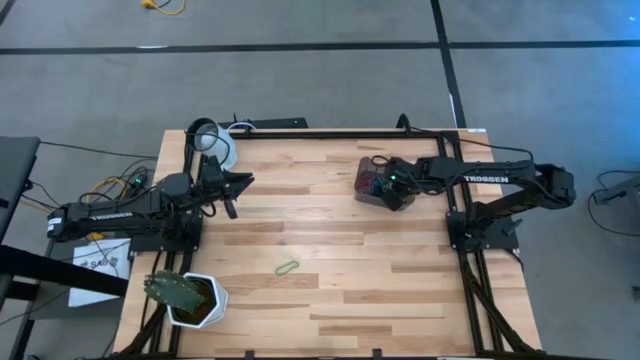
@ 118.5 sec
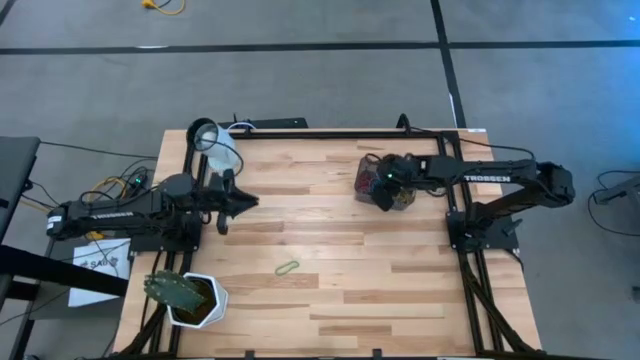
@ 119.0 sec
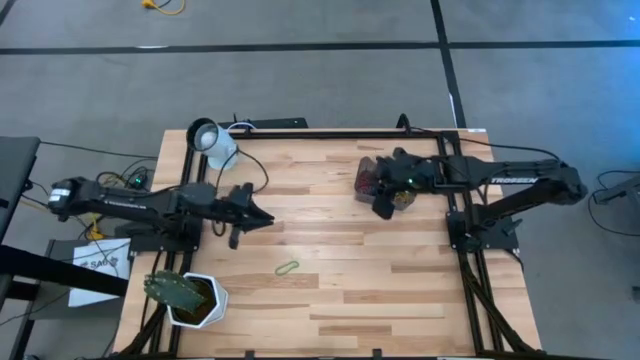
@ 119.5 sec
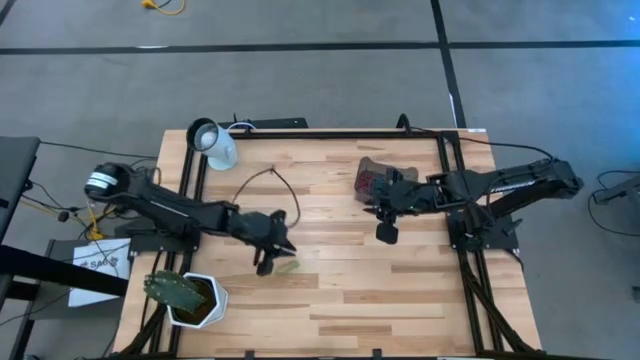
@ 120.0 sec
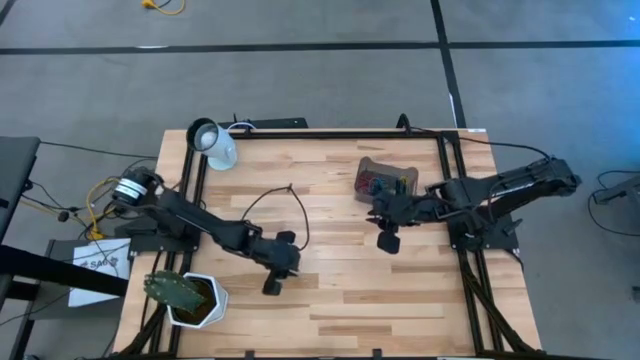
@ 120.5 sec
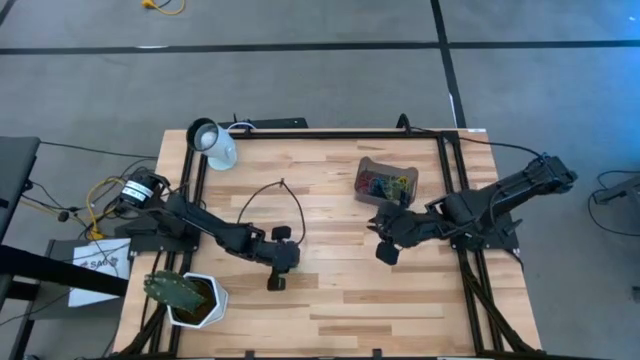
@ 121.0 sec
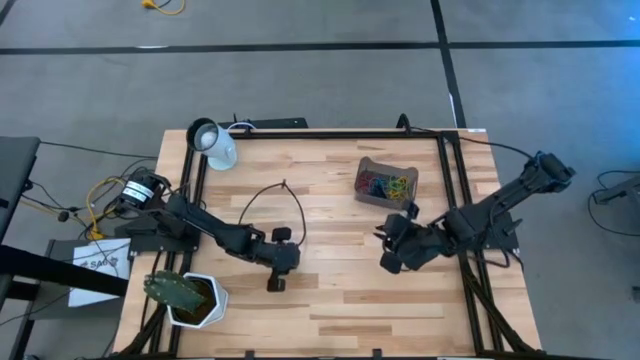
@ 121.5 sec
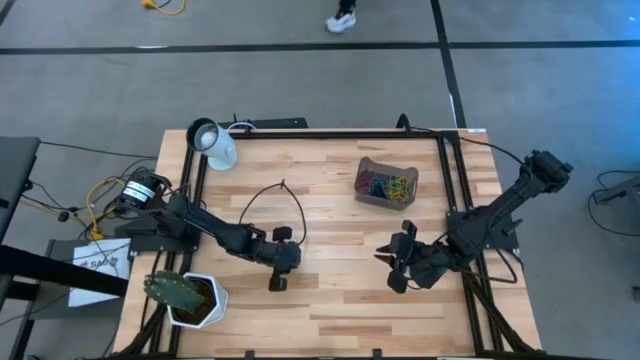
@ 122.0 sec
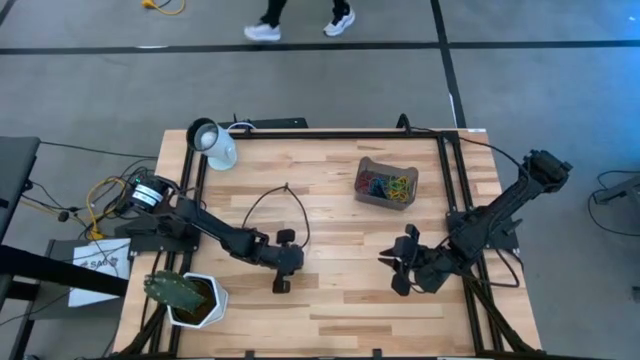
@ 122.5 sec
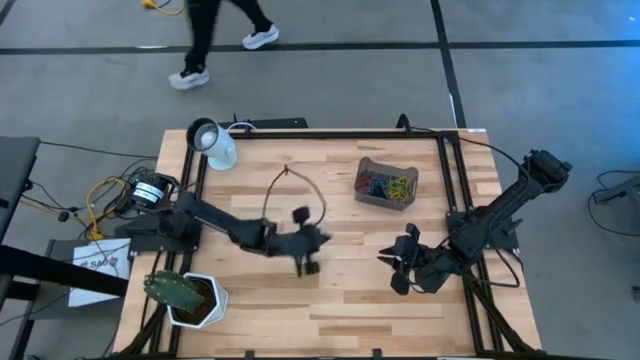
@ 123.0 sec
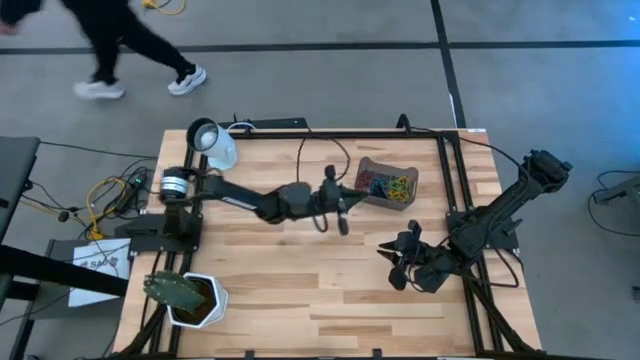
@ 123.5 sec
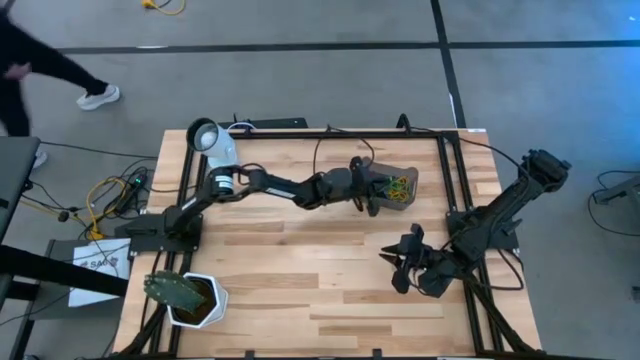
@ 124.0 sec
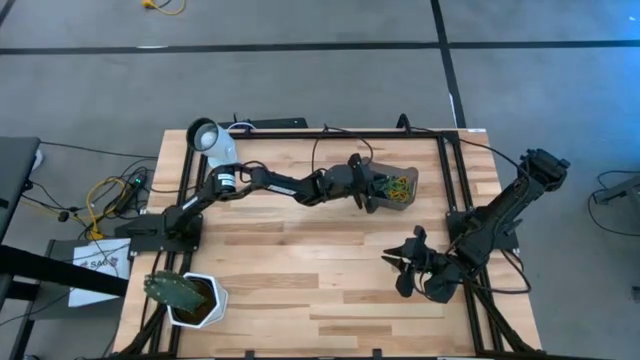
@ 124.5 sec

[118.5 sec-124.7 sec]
Task: Pick and place rubber bands into bin
Put the green rubber band into the black container

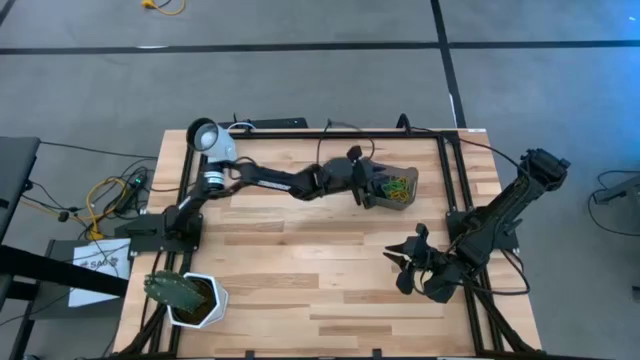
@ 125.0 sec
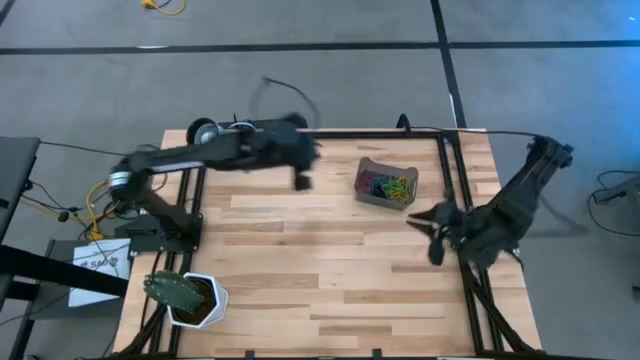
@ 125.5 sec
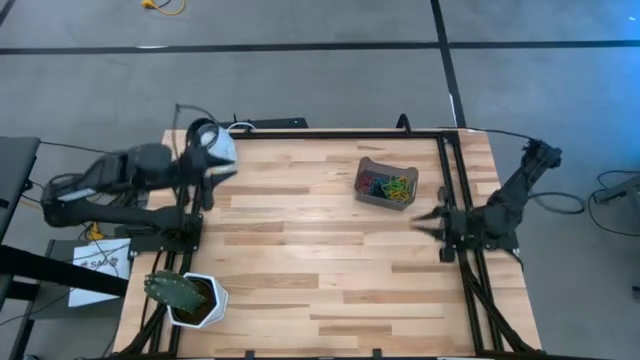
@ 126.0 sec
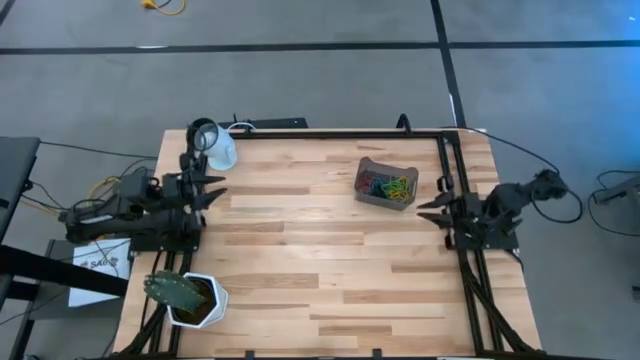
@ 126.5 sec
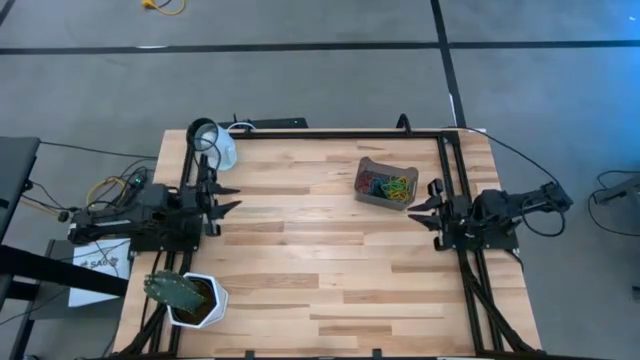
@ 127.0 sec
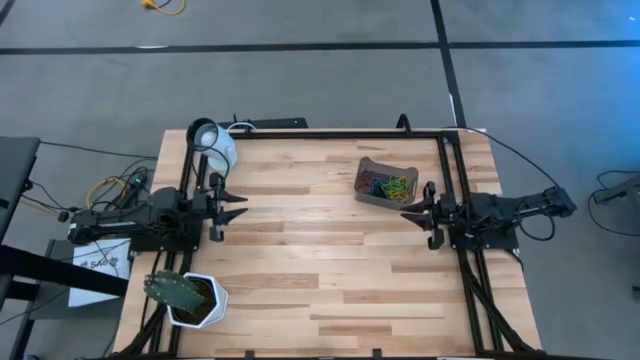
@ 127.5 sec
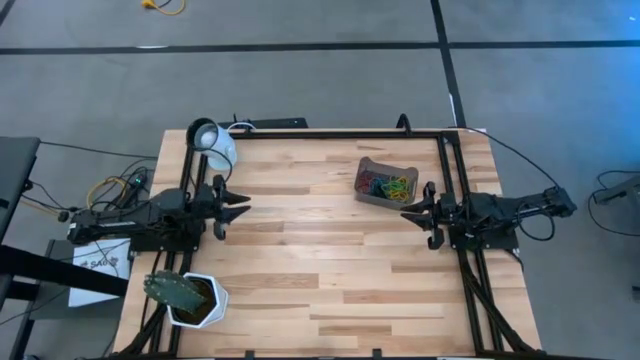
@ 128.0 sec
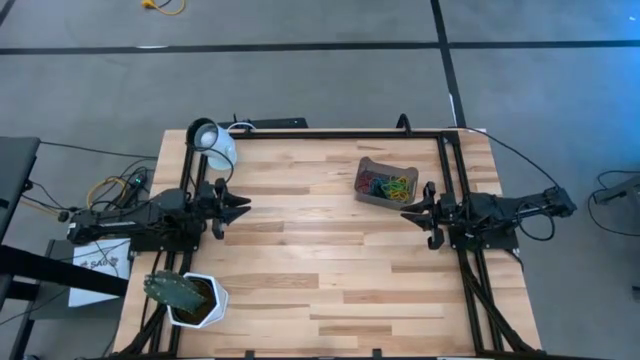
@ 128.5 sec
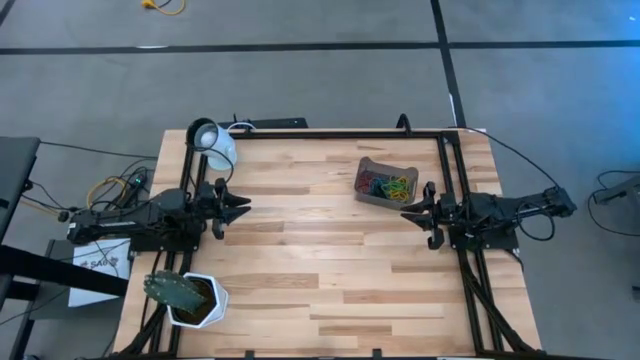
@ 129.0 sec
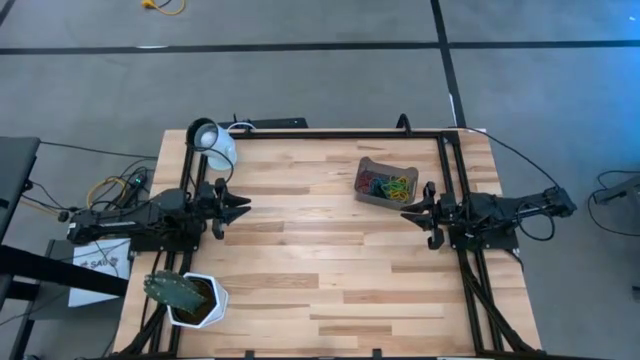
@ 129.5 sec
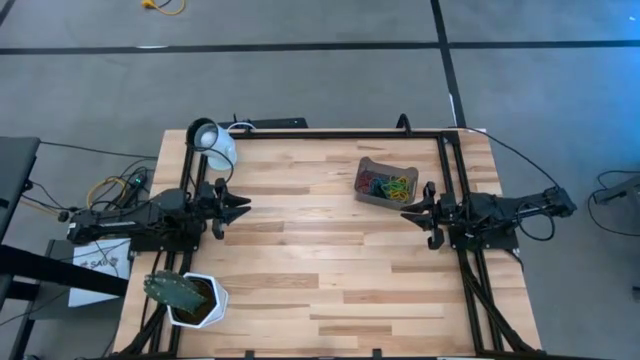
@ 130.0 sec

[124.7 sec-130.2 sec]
Return to Home Position

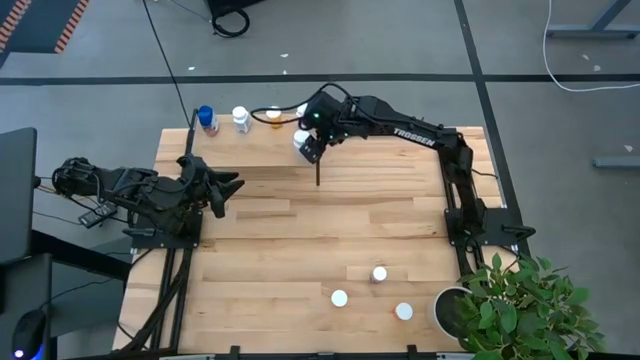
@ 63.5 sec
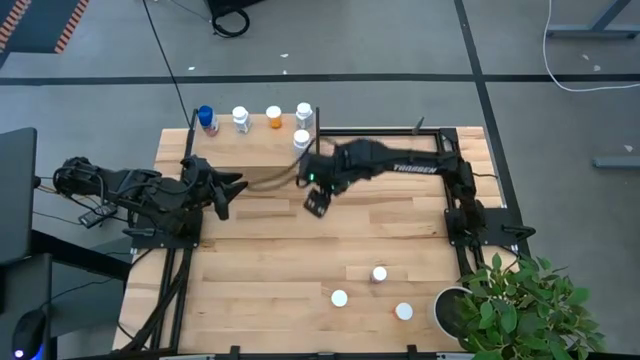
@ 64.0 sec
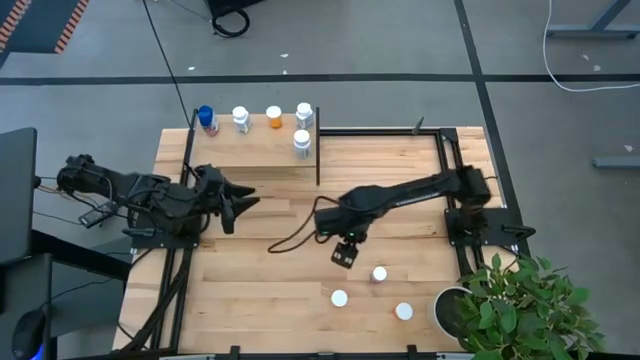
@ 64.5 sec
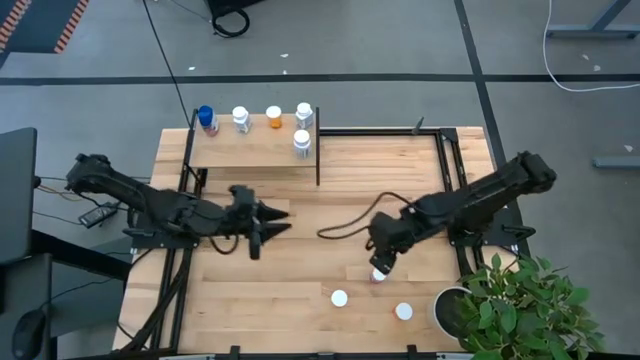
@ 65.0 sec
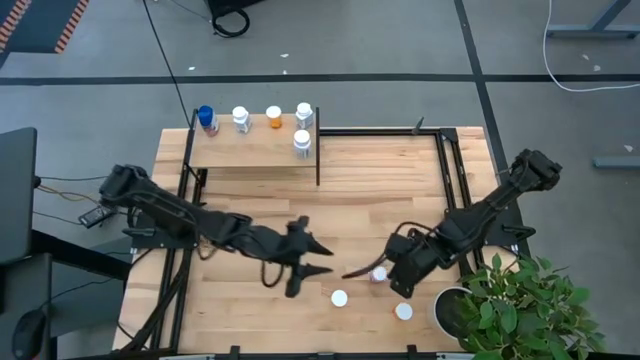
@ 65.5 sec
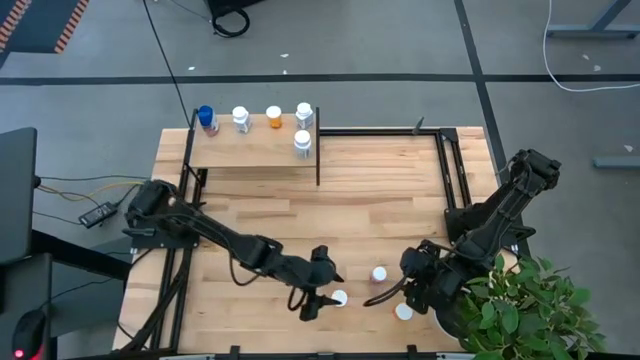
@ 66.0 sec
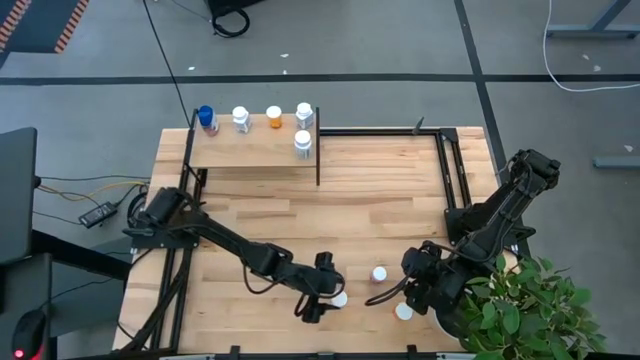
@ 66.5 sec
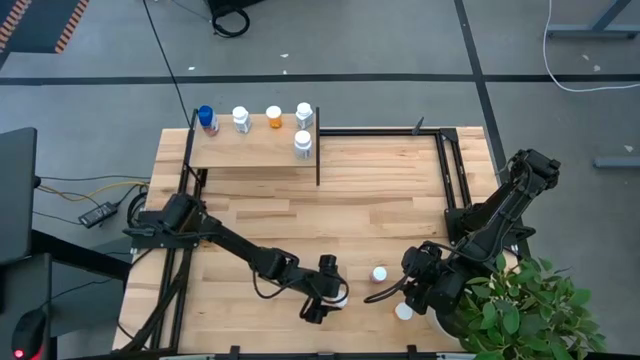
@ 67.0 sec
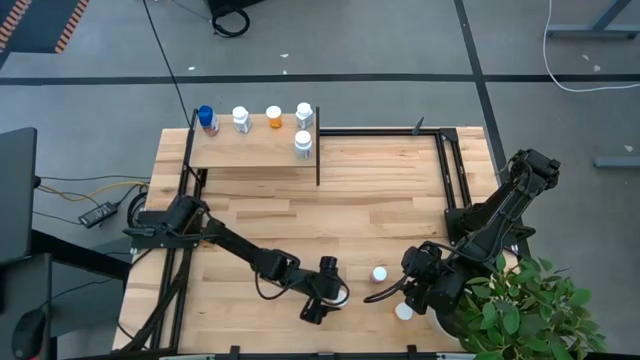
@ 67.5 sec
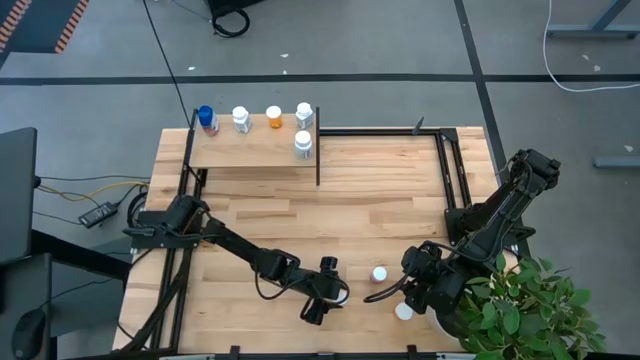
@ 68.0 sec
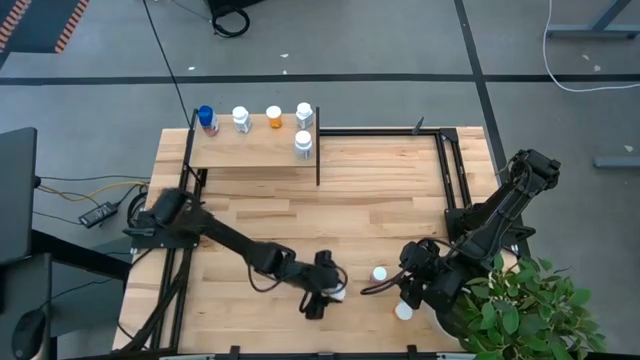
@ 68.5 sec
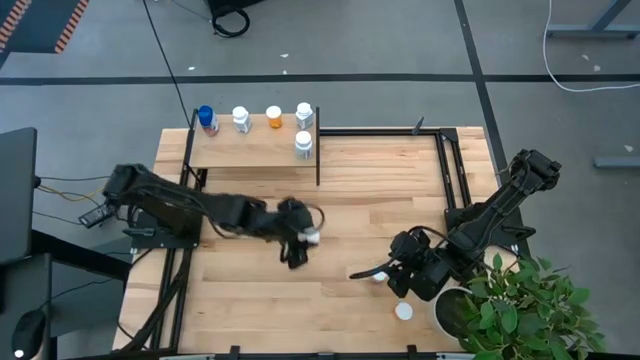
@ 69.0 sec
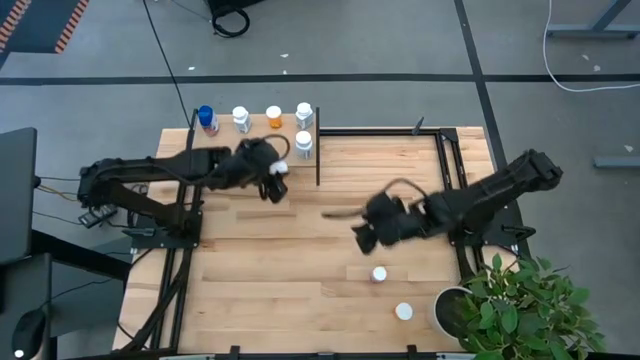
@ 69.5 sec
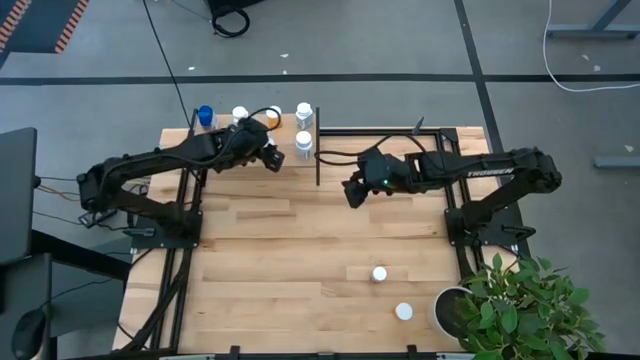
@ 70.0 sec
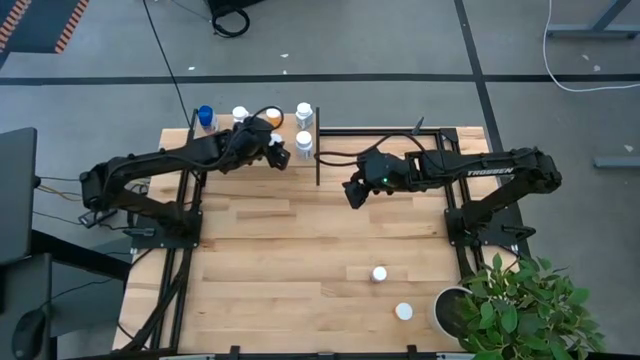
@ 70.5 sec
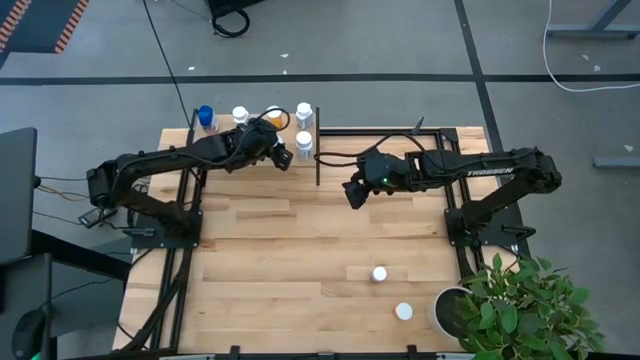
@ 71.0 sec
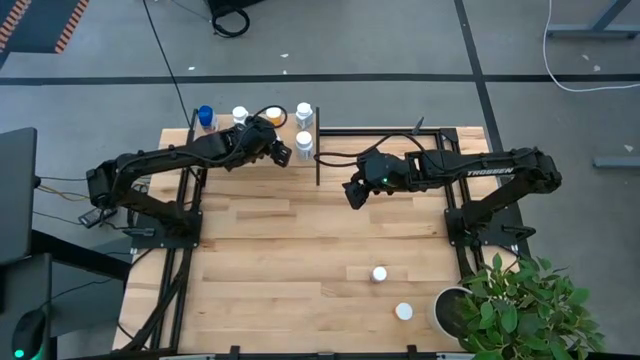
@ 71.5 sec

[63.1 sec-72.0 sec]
Task: Pick and place medicine bottles onto shelf by color
Put the left orange bottle on the shelf
